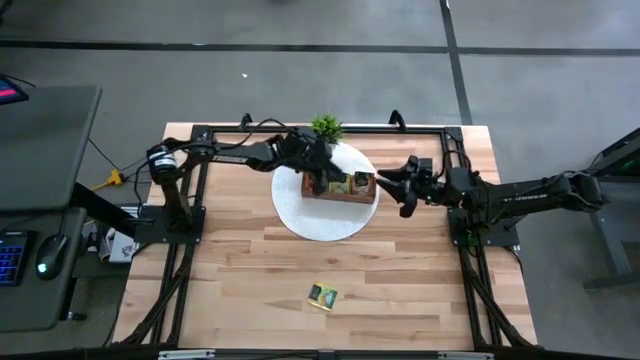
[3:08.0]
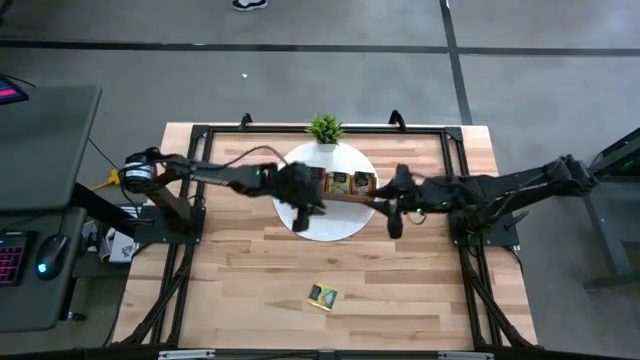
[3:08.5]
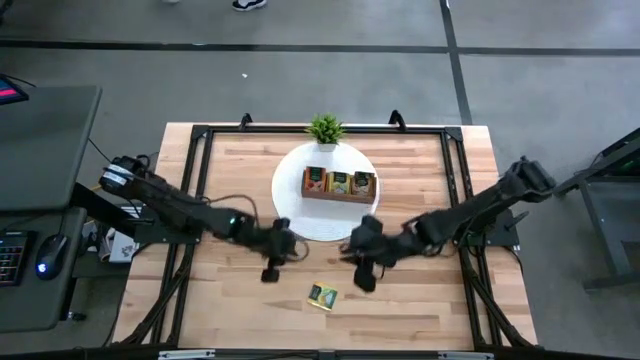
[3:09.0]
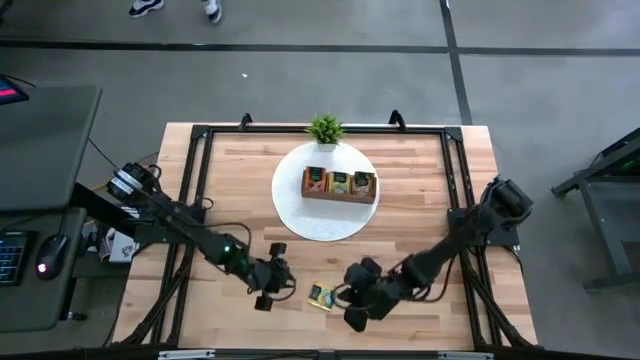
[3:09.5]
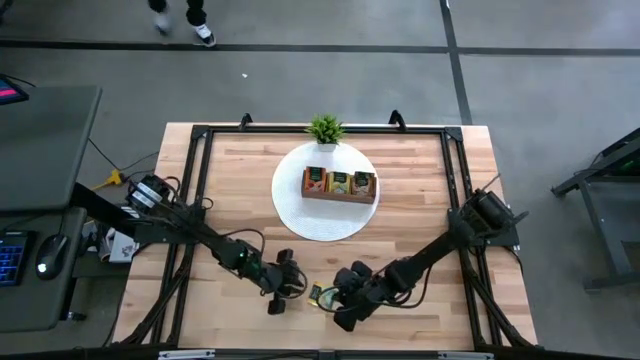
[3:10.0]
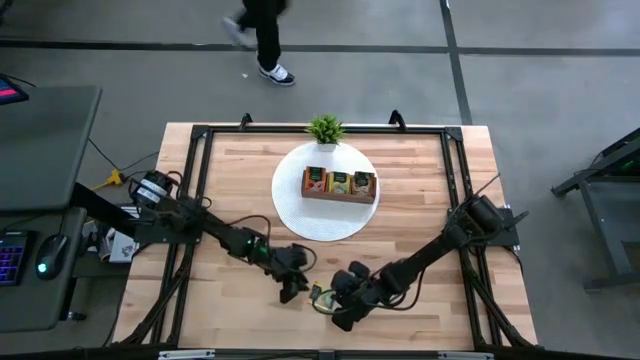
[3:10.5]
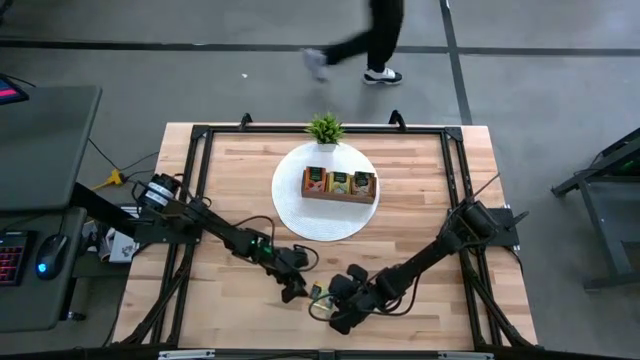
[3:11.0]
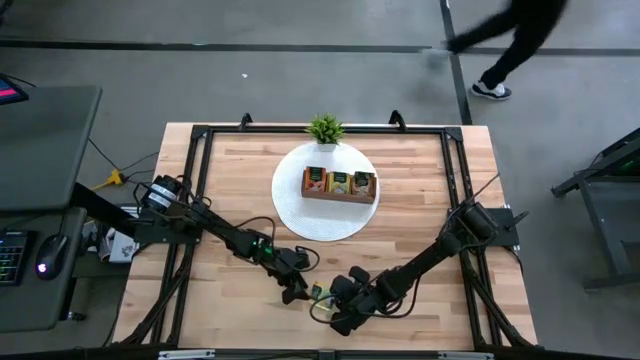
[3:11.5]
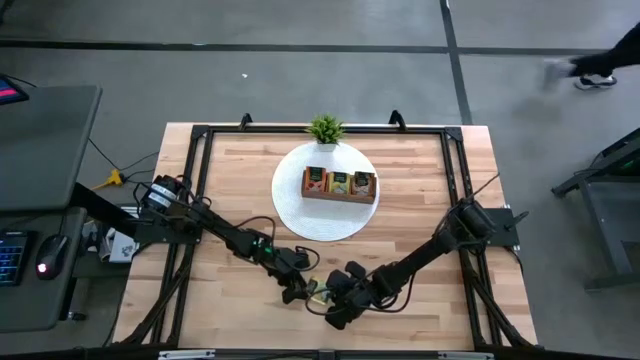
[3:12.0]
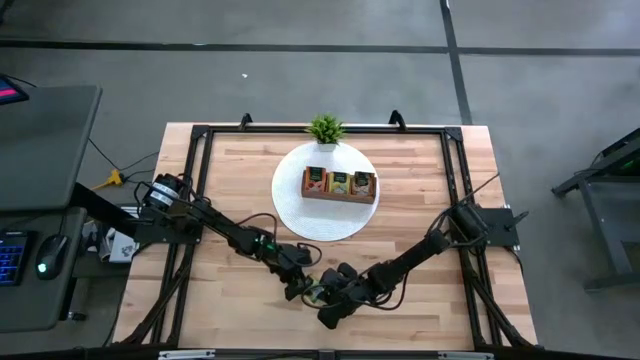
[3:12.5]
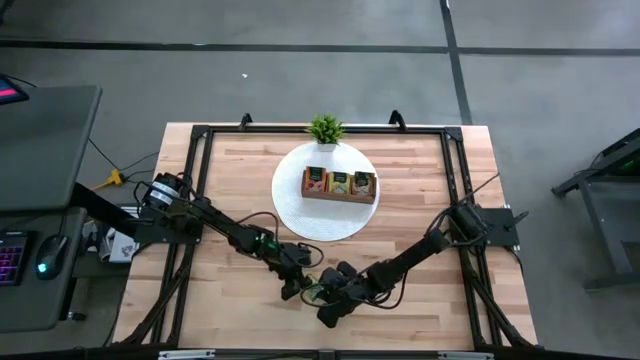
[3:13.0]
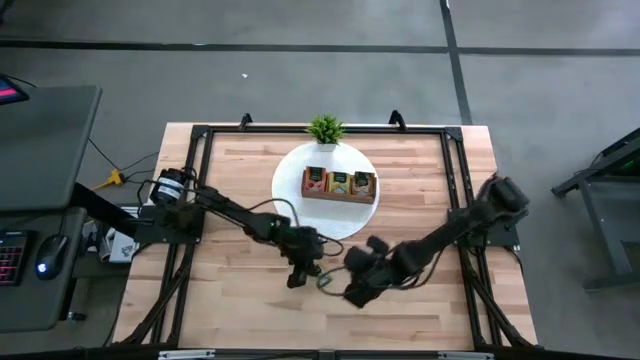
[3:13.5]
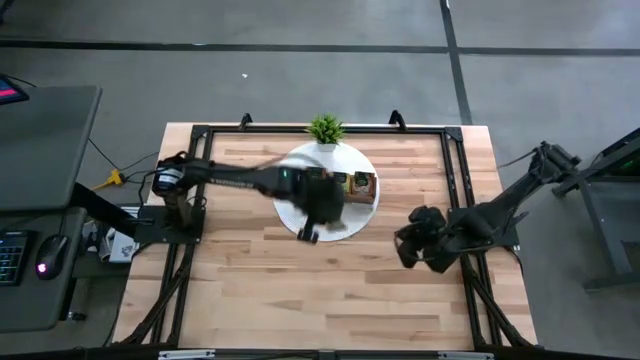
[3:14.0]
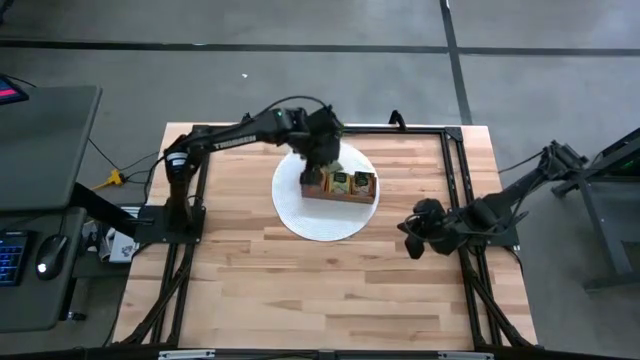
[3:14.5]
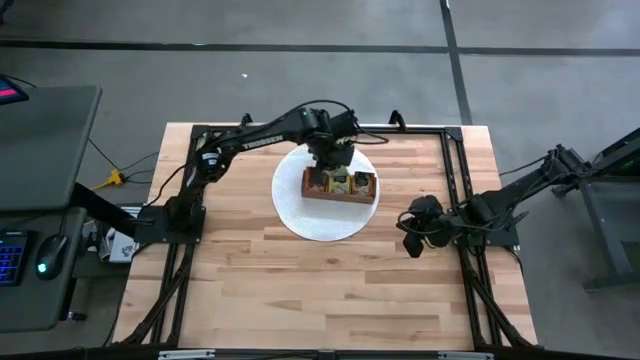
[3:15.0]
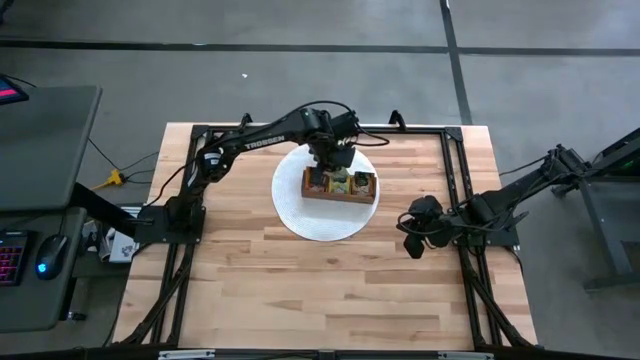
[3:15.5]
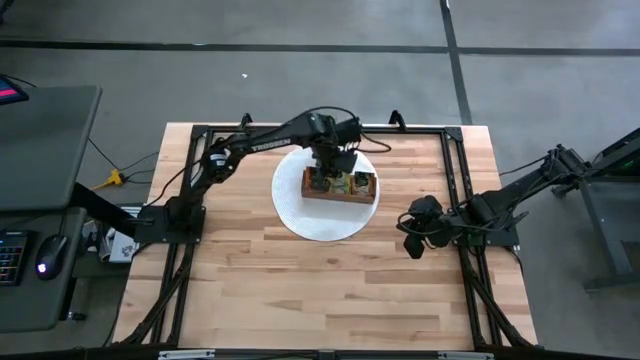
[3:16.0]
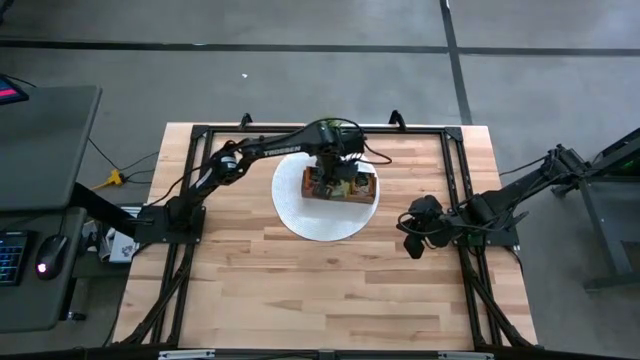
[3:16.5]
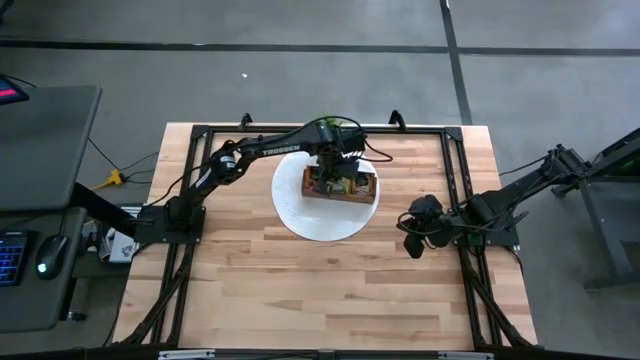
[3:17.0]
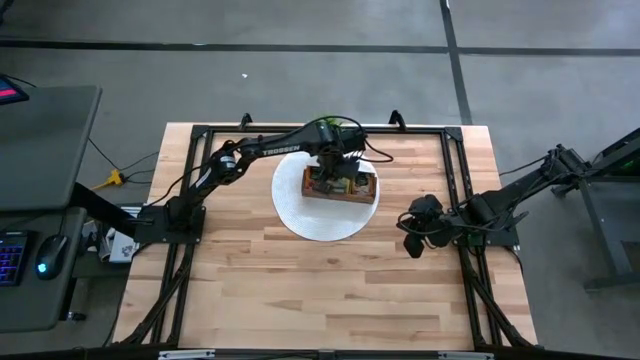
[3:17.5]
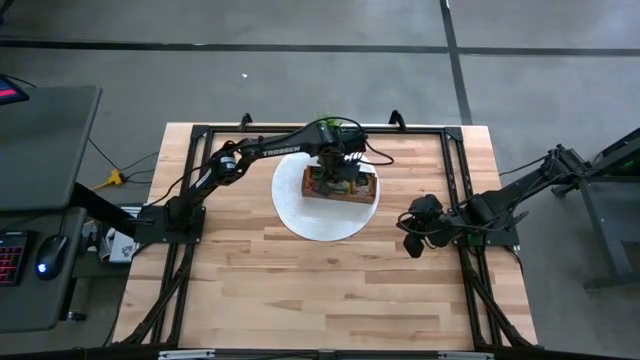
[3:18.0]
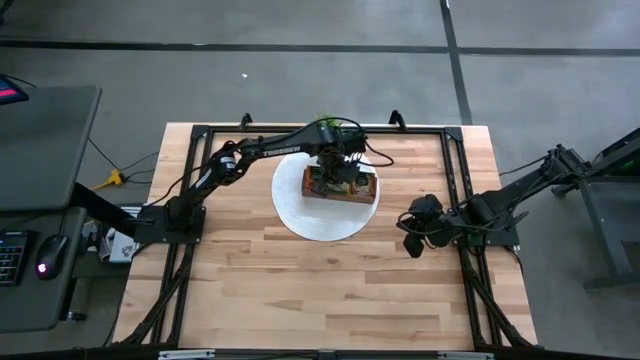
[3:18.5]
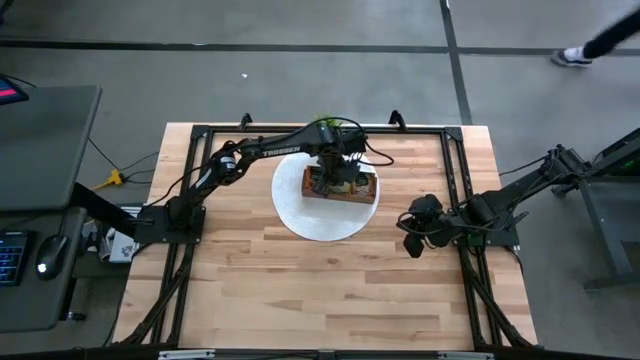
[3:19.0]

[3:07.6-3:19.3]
Task: Pick & Place Tea
Put the yellow tea bag into the middle section of the wooden organizer

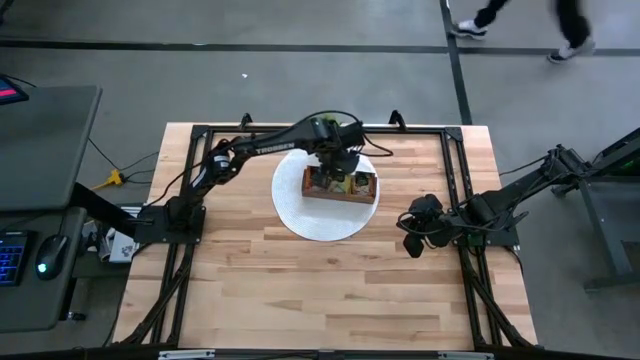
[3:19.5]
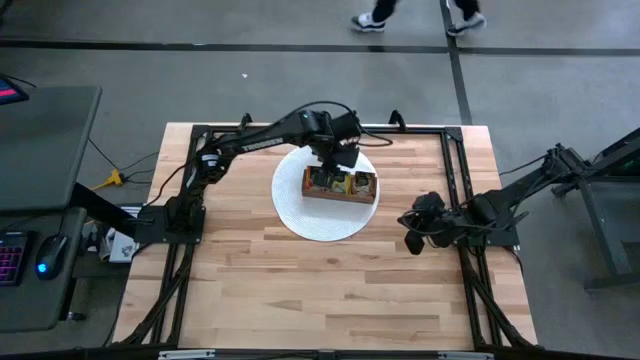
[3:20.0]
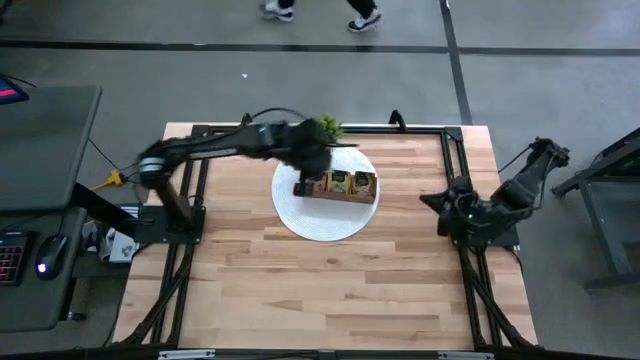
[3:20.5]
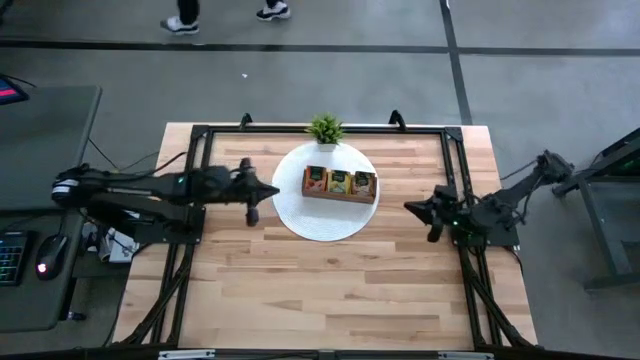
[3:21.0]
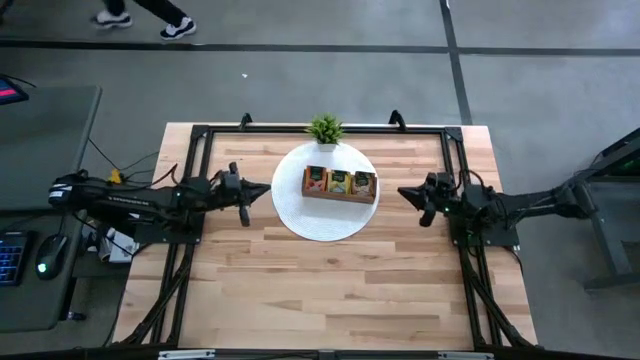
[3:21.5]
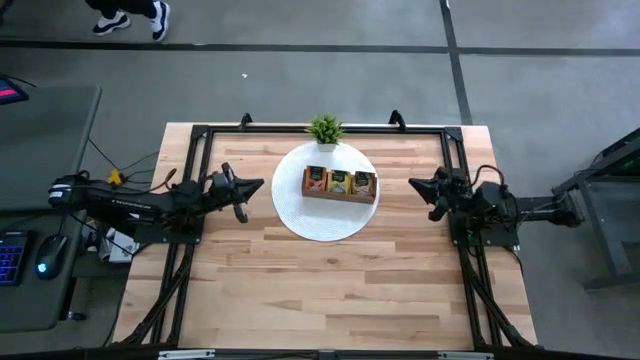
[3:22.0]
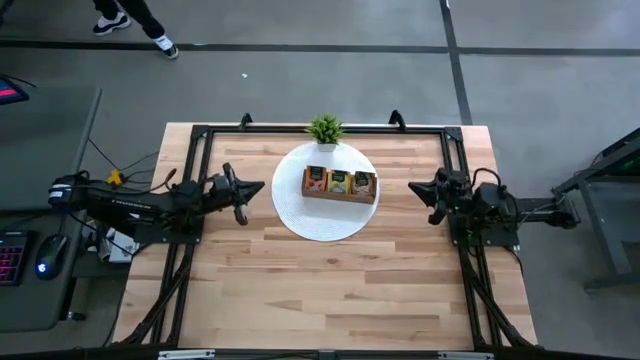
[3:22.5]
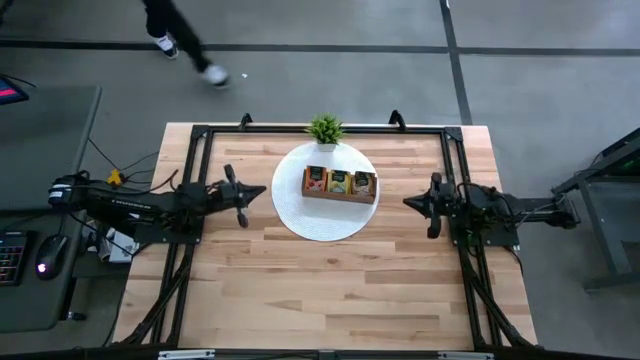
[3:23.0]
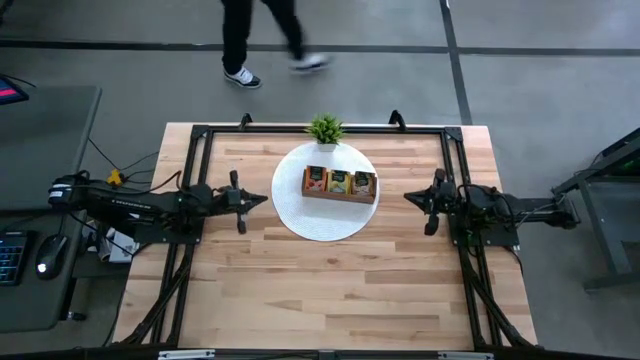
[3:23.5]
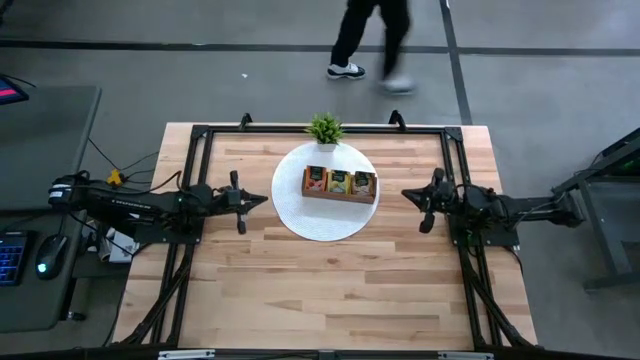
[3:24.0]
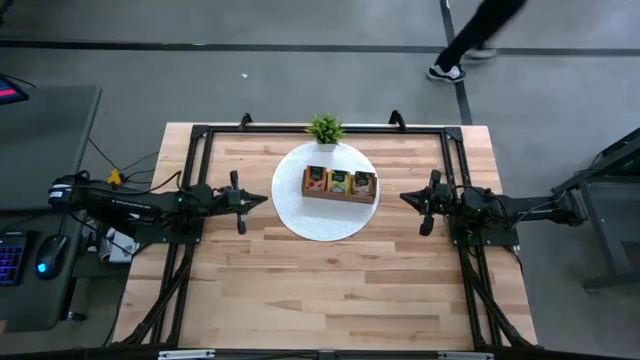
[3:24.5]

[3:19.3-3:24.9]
Return to Home Position

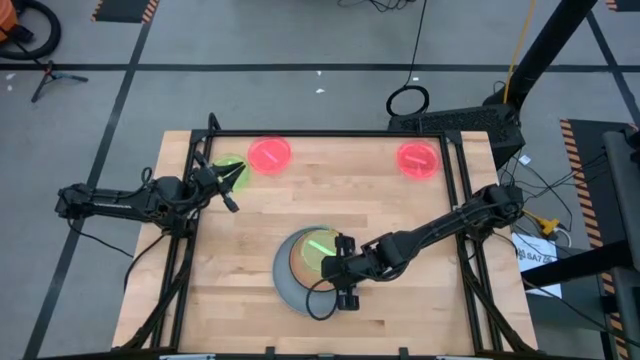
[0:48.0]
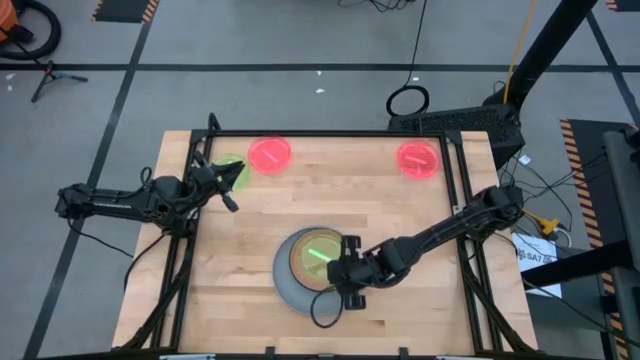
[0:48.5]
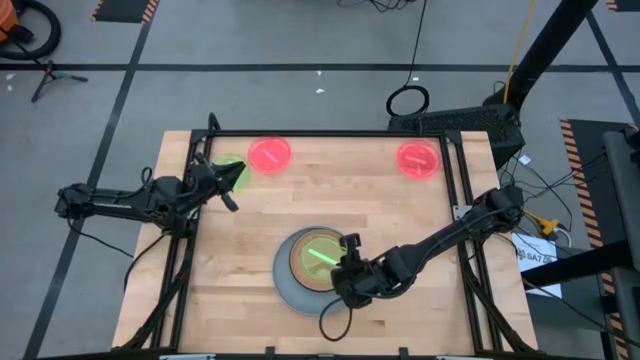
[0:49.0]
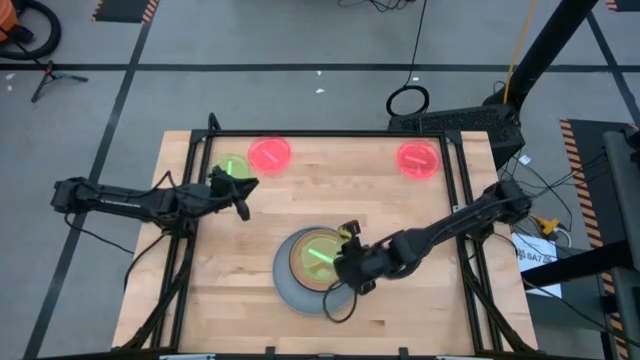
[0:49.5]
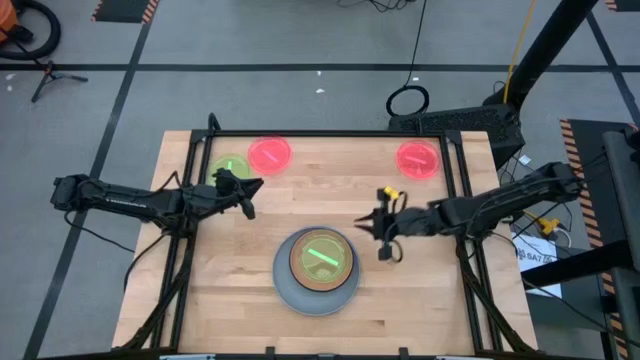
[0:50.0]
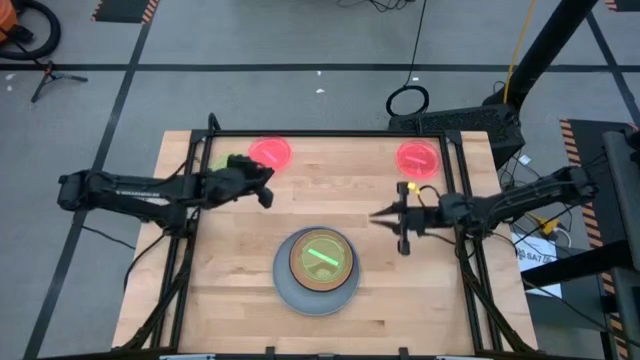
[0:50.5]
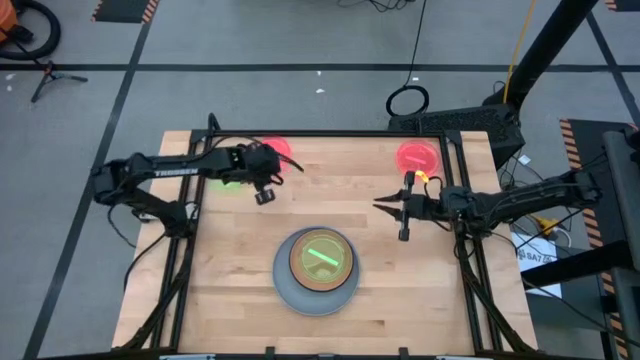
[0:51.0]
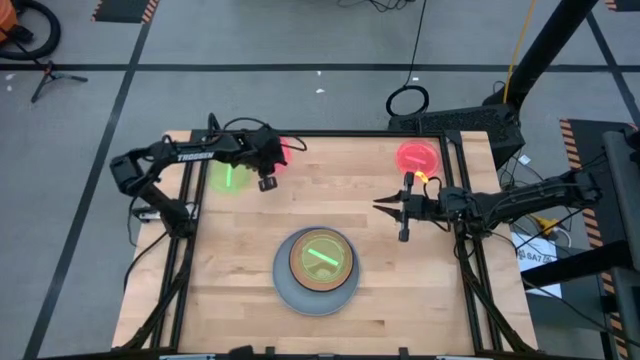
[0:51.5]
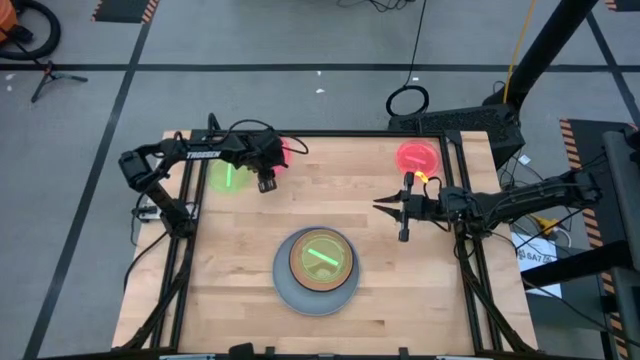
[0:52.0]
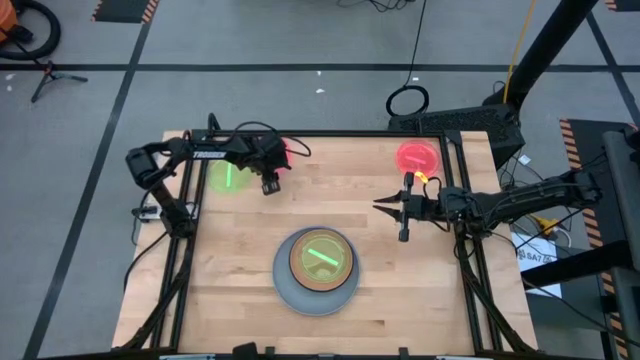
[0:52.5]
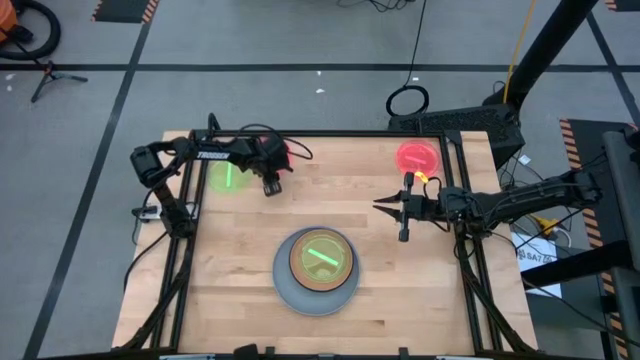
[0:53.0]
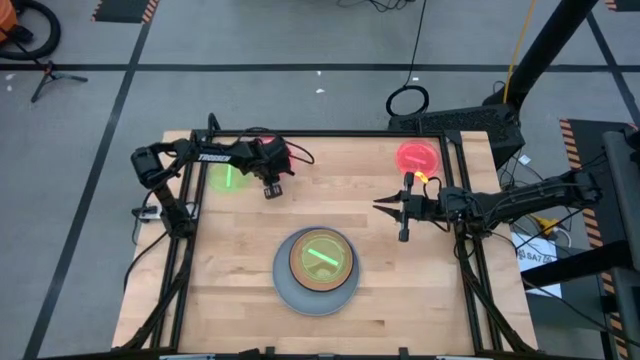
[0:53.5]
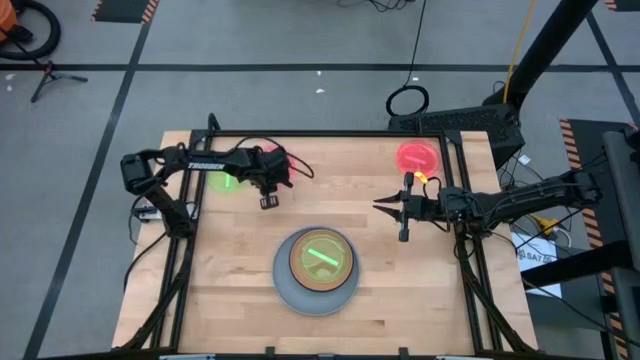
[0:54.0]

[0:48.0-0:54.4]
Task: Stack plastic plates
Stack the left red transparent plate on top of the green transparent plate
